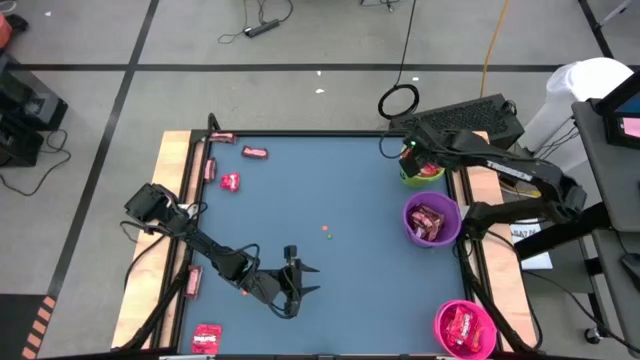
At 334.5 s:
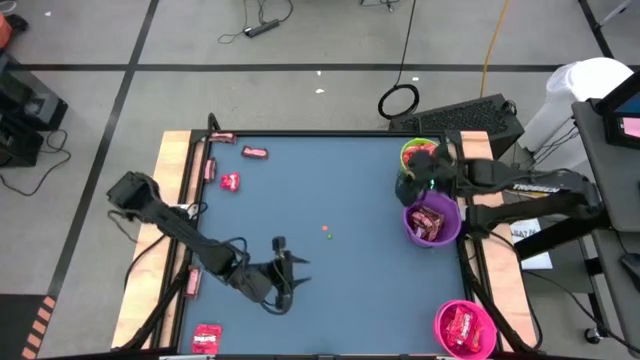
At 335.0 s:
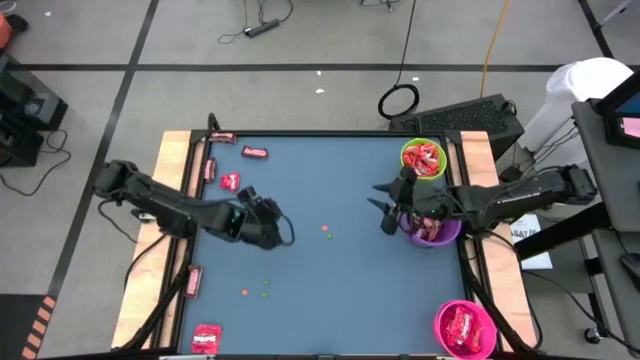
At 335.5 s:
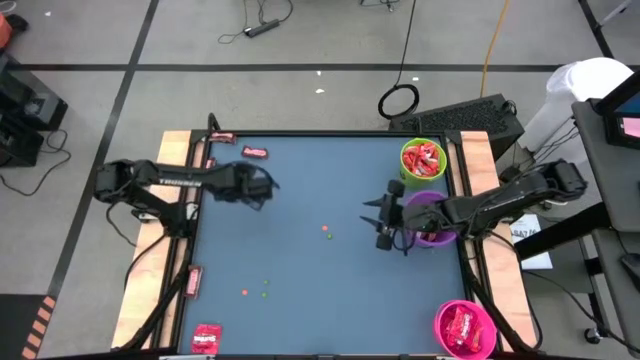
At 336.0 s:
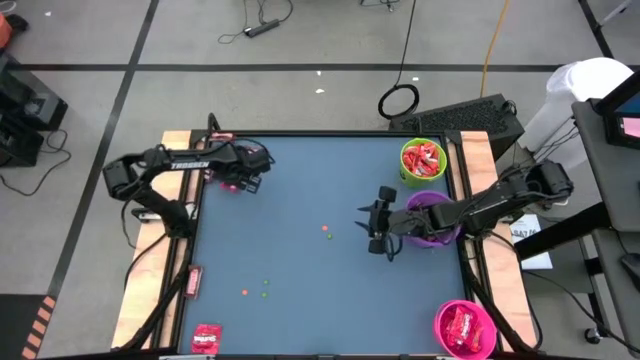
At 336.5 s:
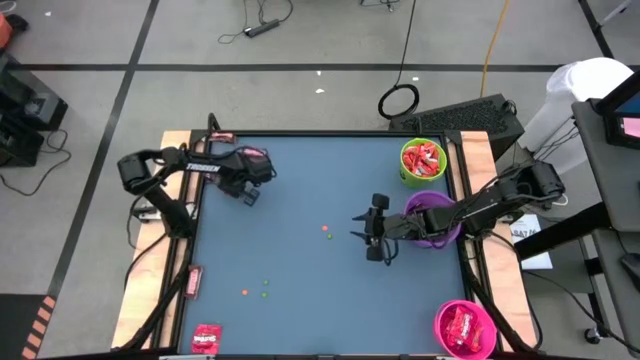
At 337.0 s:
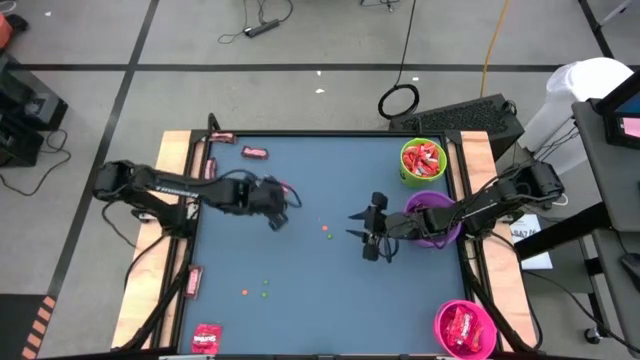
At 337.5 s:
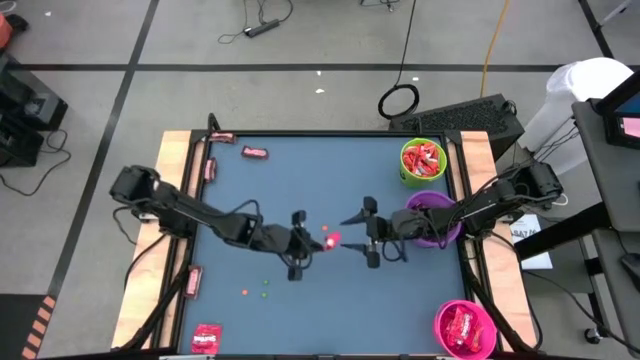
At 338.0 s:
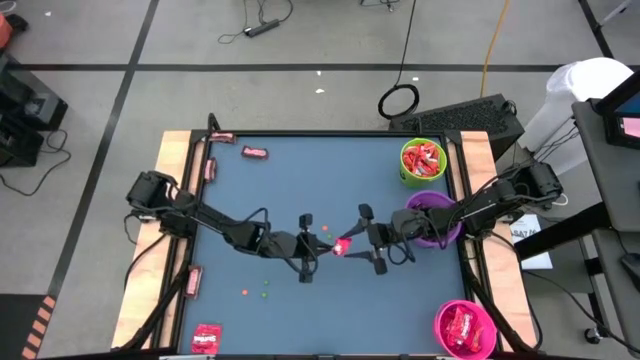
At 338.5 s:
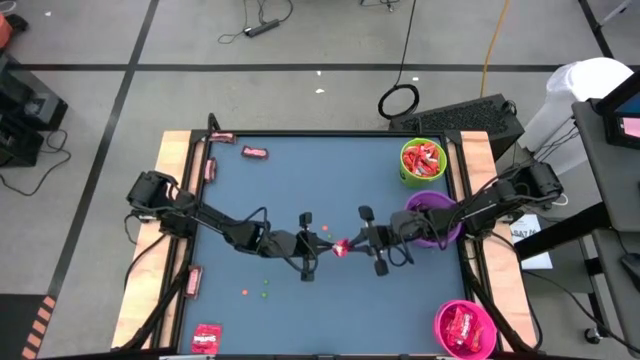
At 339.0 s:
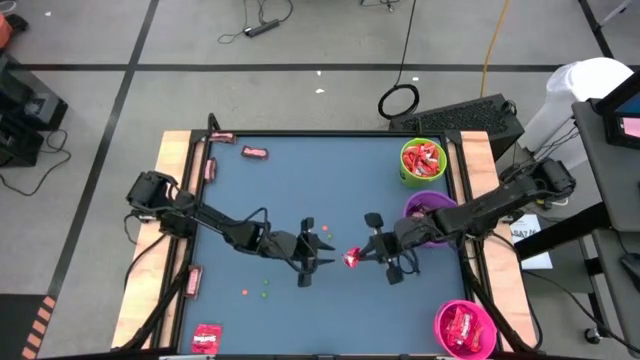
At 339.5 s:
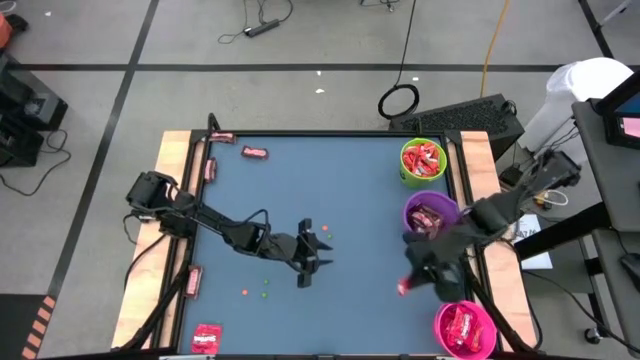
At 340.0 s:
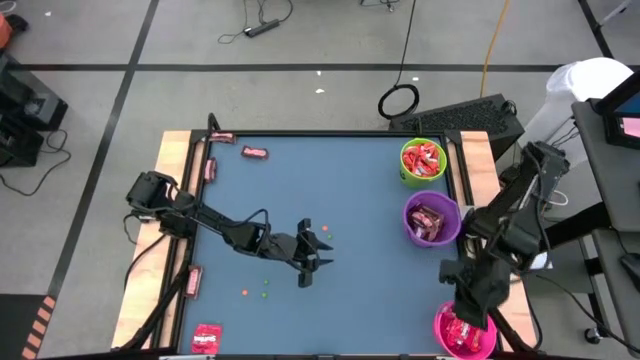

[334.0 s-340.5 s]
Task: Organize candy in baskets
Put the red candy pack into the pink bucket

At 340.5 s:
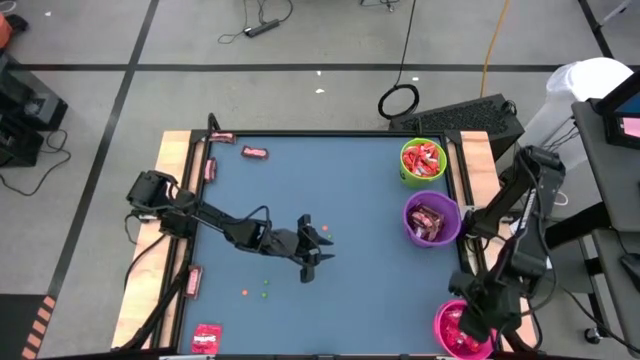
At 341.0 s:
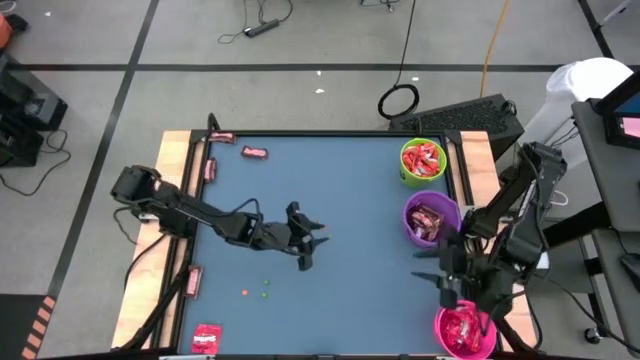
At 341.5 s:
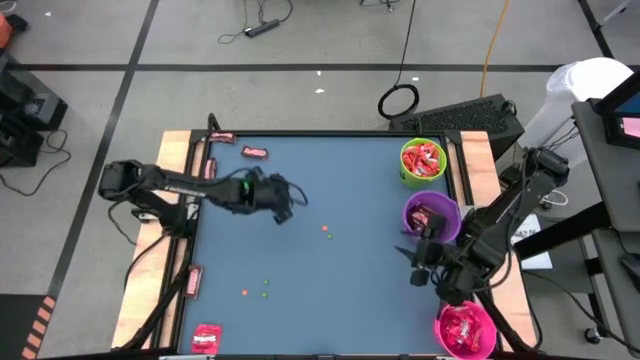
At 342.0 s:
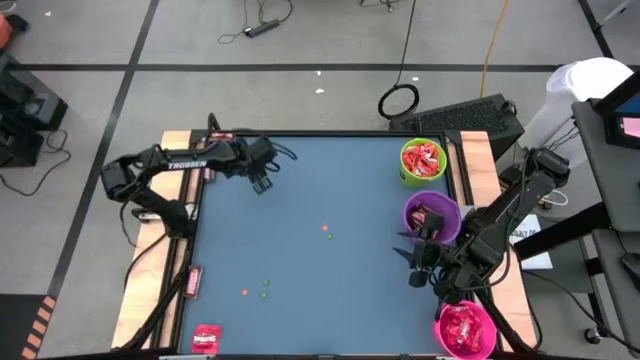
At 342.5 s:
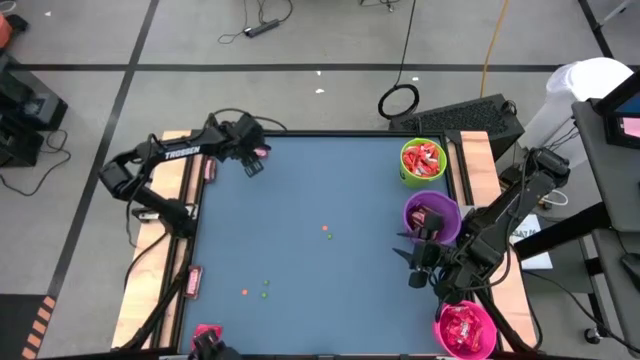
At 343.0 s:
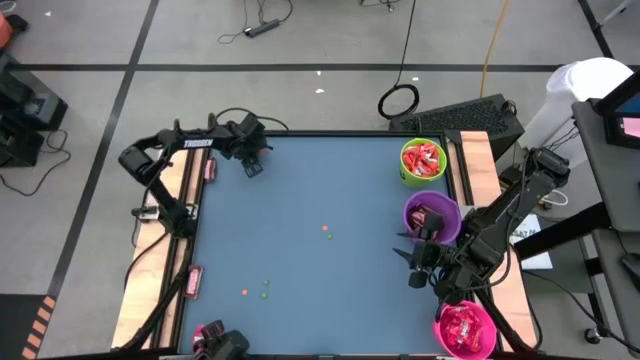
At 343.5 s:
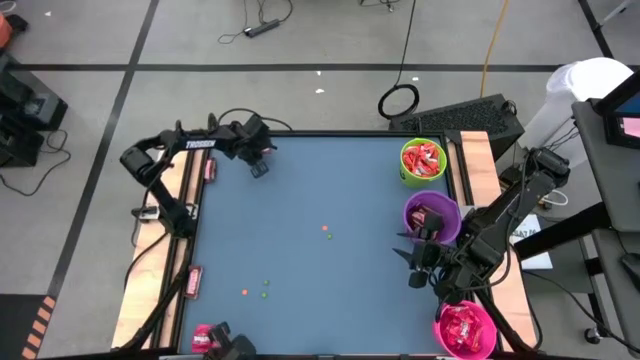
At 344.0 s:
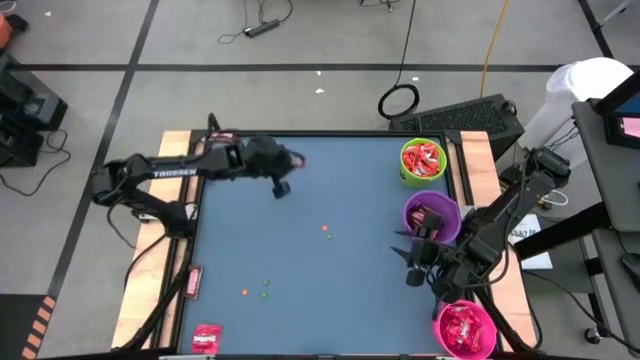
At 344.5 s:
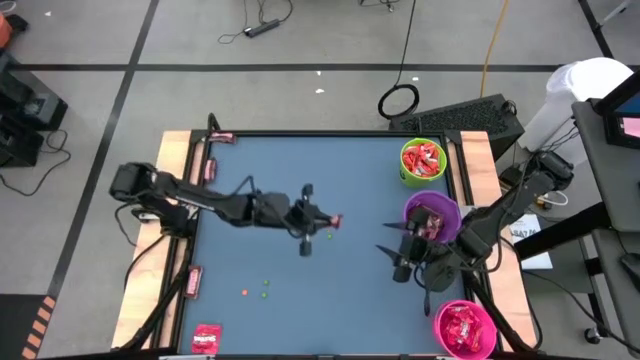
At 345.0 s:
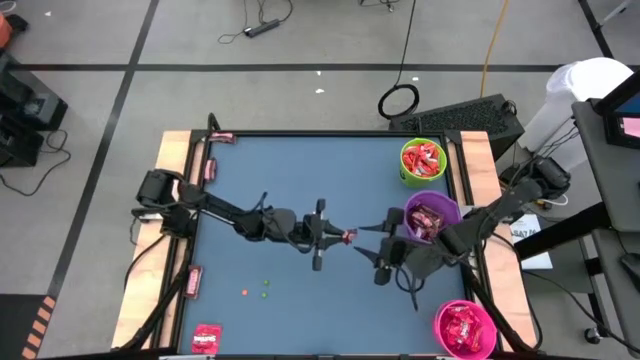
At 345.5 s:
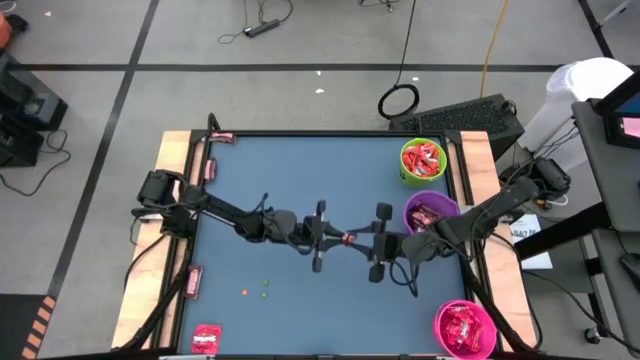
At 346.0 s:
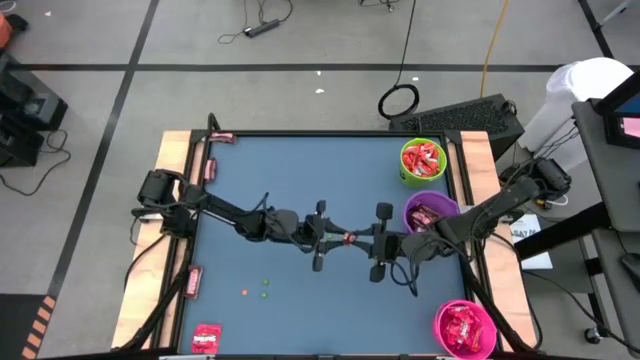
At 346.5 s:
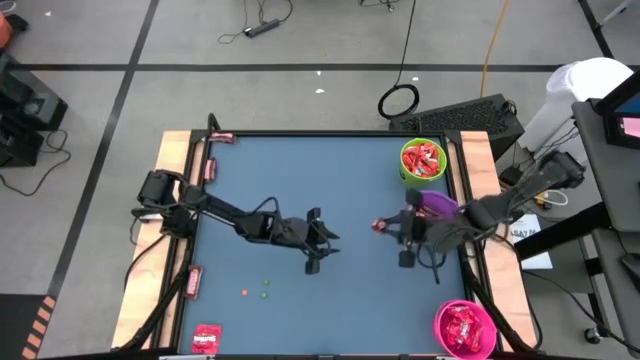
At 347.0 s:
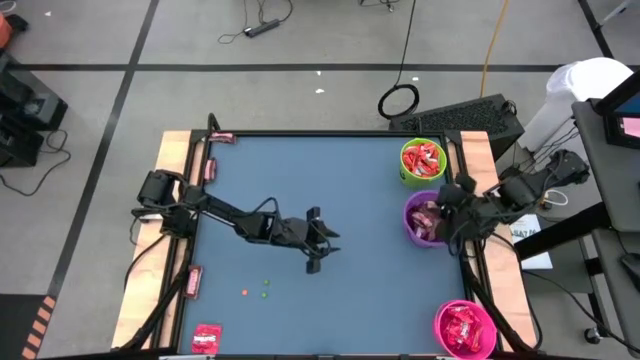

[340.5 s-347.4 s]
Put the brown chocolate bar into the violet bucket

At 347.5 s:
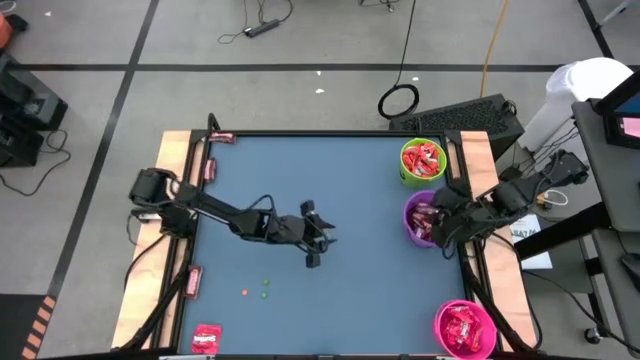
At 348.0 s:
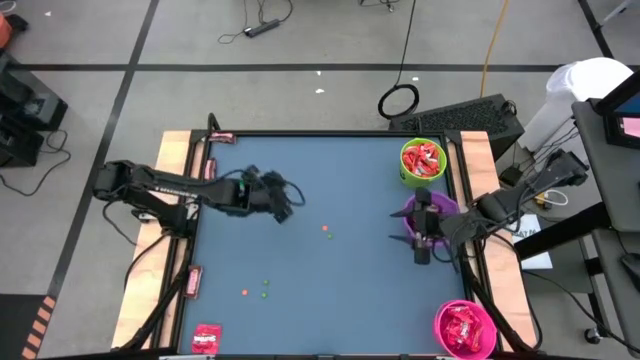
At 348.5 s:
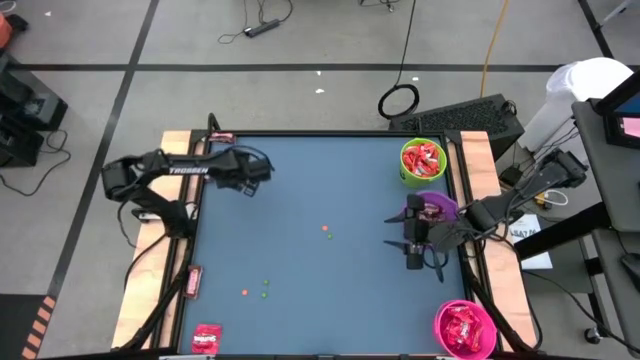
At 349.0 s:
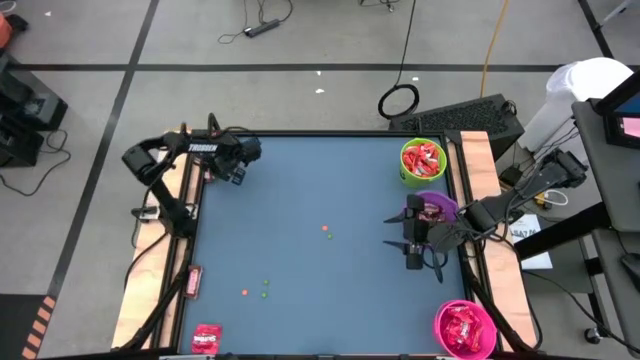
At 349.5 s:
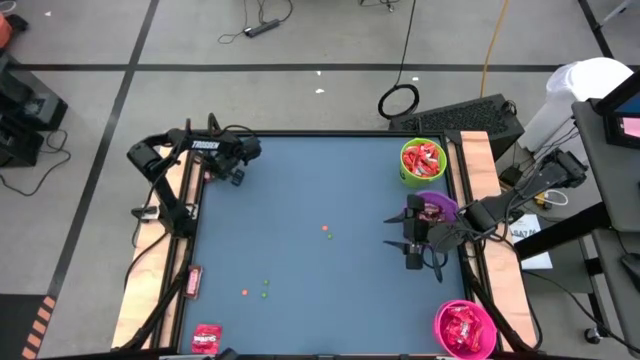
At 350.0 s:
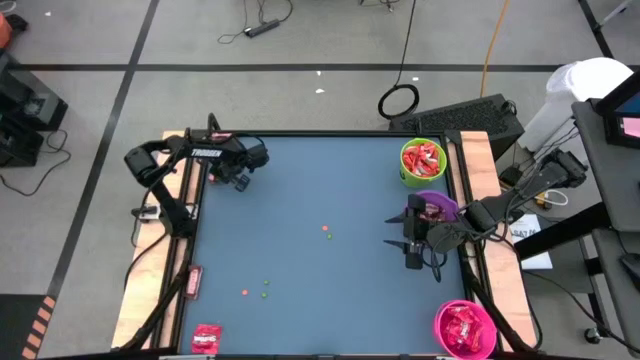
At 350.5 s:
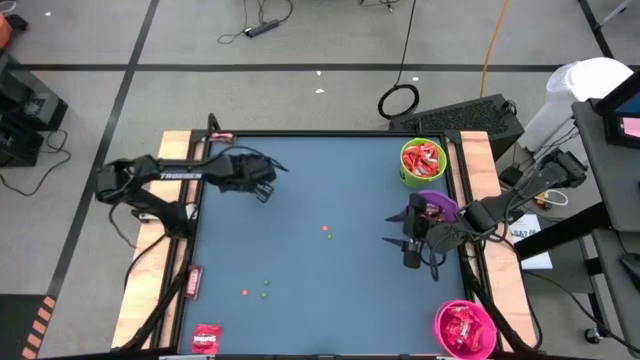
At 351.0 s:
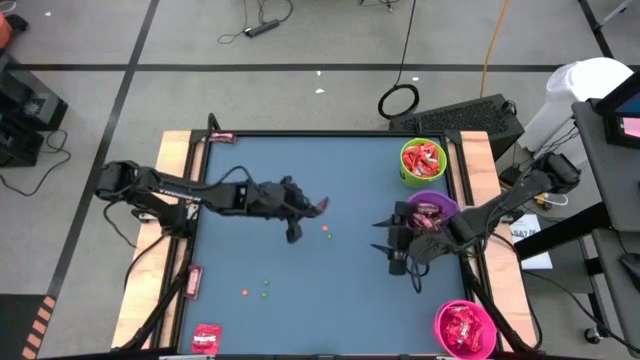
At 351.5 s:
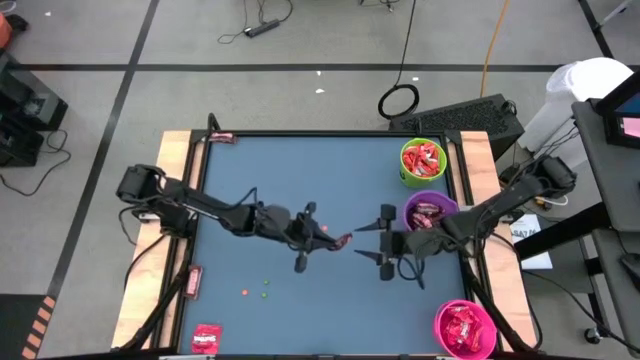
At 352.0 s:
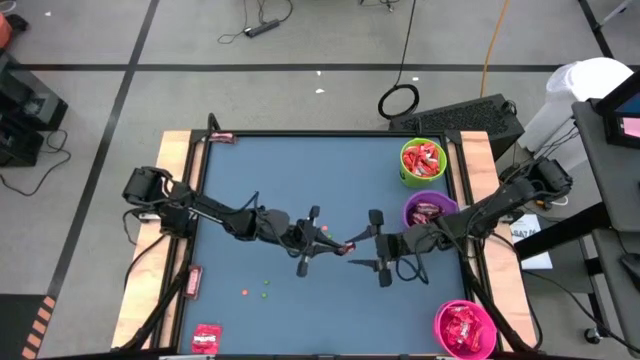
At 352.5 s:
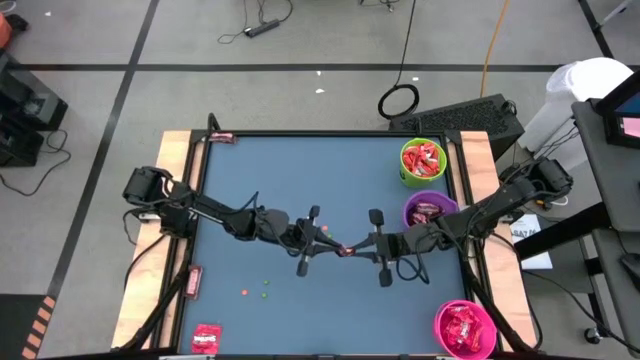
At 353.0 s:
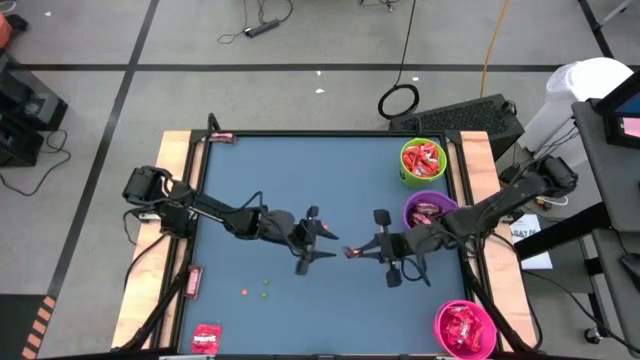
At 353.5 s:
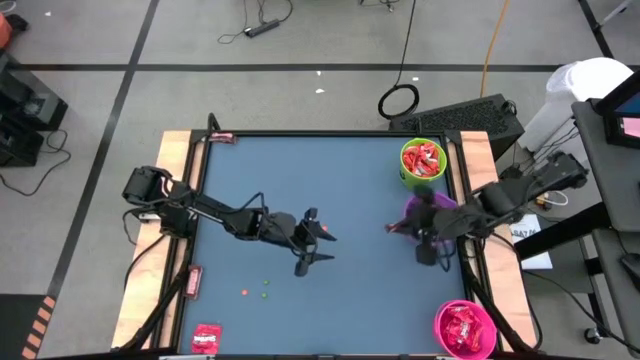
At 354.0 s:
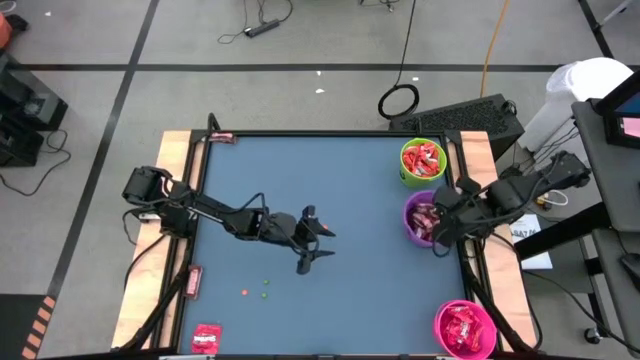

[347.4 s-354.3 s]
Put the brown chocolate bar into the violet bucket
